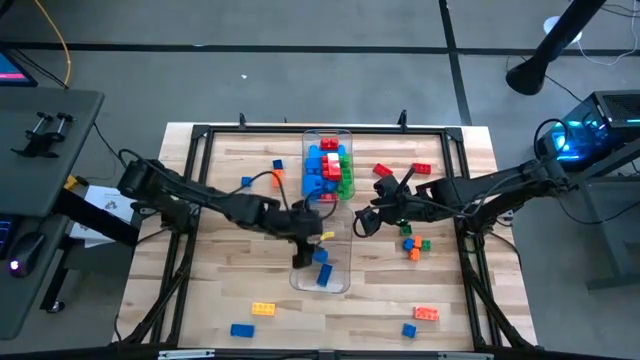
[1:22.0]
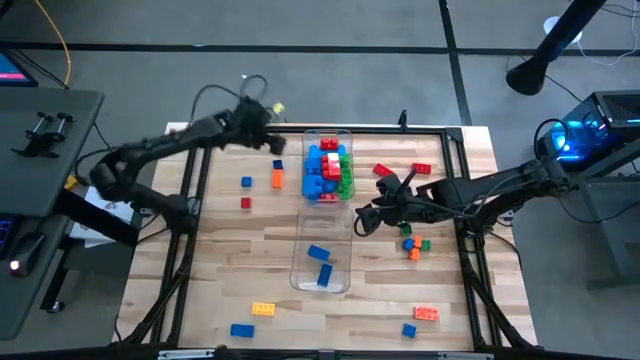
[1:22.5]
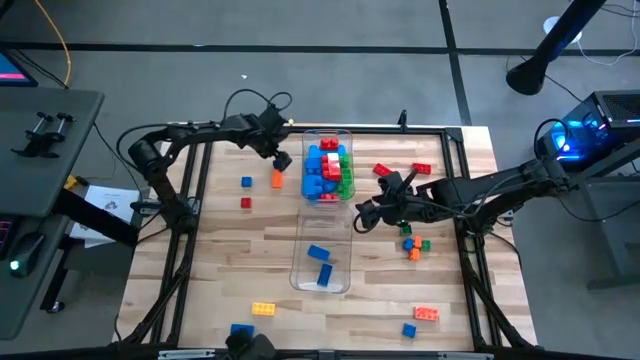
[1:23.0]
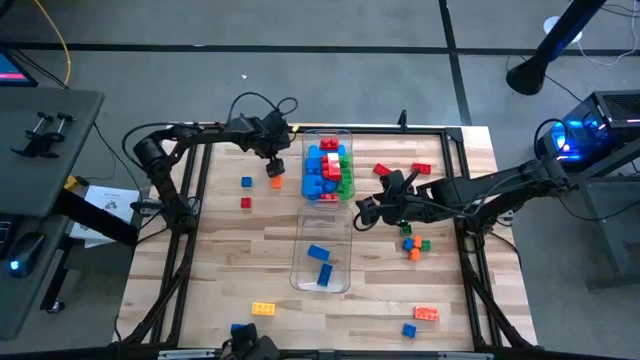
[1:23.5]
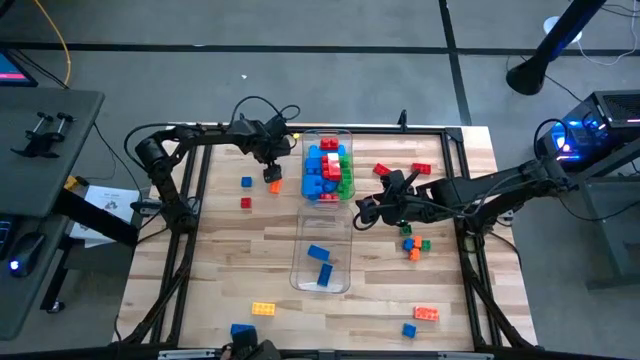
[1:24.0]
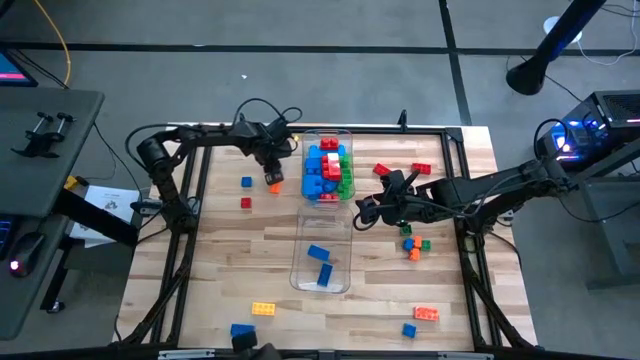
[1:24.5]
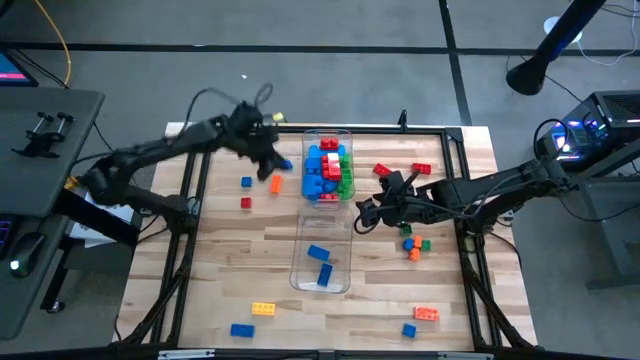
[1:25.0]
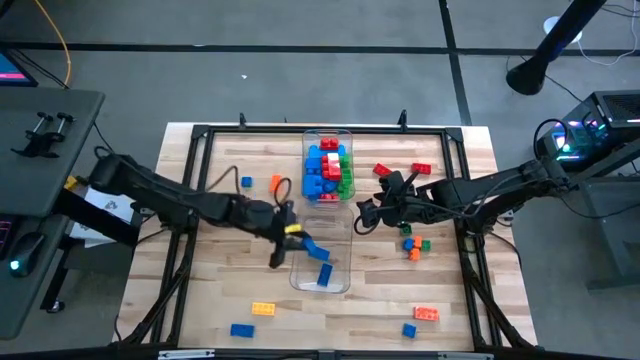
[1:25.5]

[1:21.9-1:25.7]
Task: Sort blocks by size
Put the small blue game piece in the bottom transparent bin

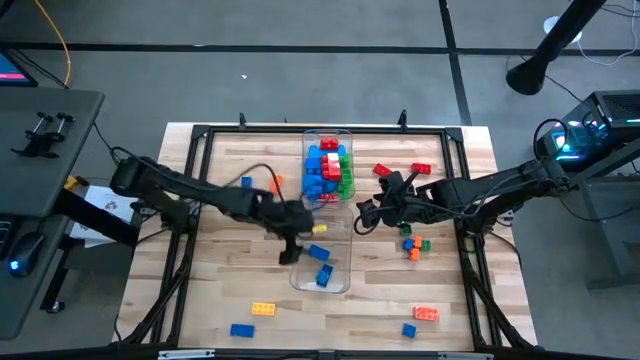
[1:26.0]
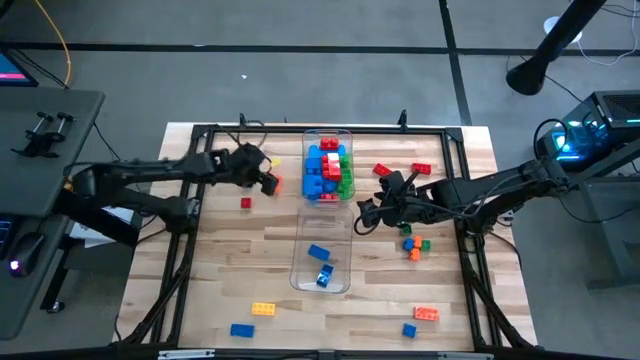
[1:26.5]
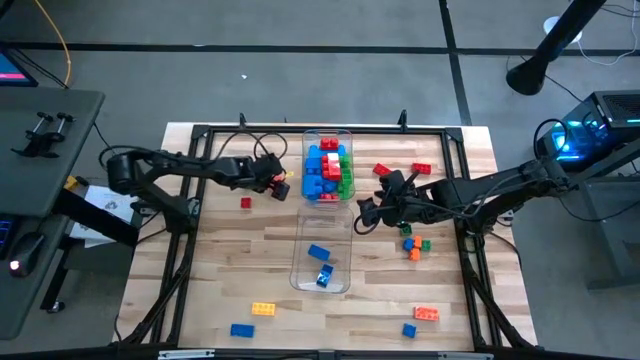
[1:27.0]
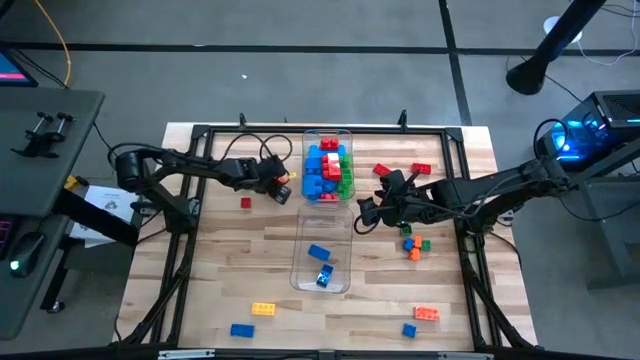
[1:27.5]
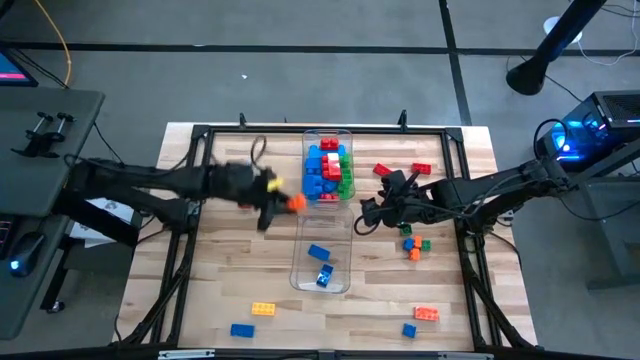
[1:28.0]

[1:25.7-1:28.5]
Put the small orange game piece in the bottom transparent bin

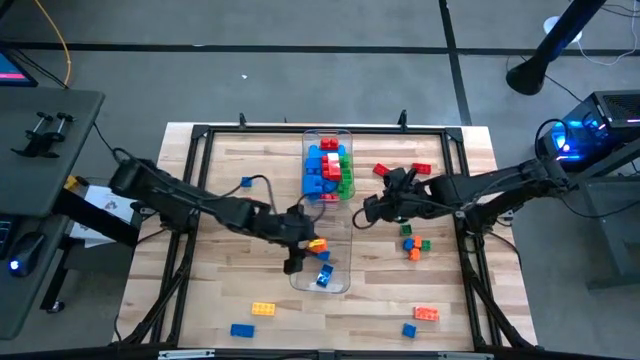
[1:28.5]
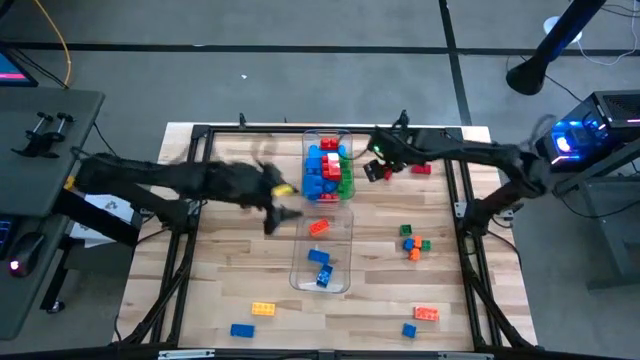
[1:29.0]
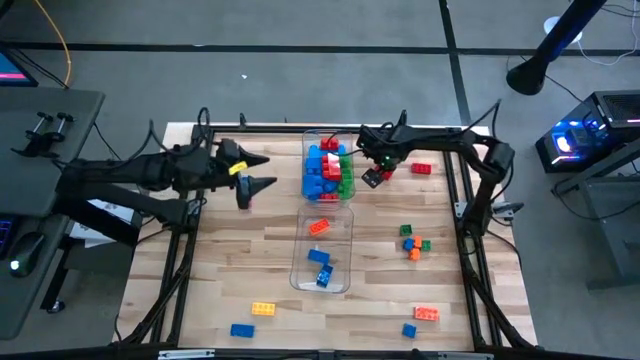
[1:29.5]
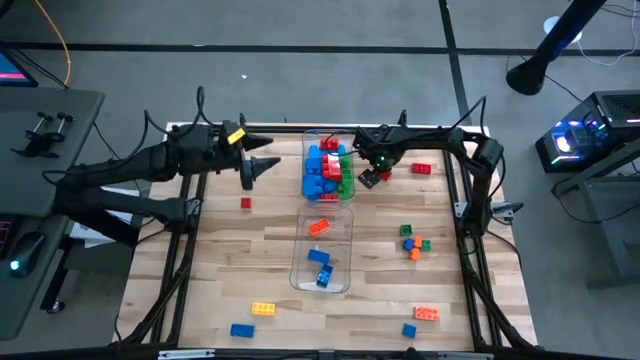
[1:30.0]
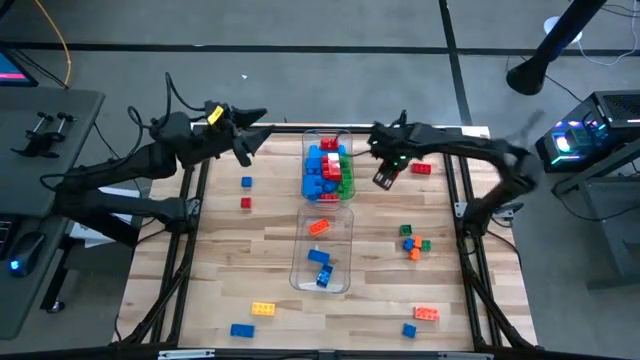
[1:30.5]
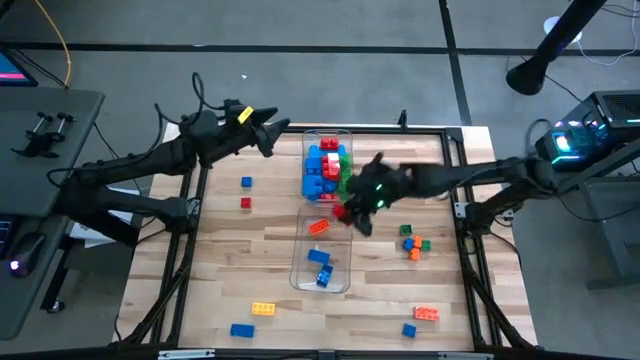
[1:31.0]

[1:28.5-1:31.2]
Put the small red game piece in the bottom transparent bin

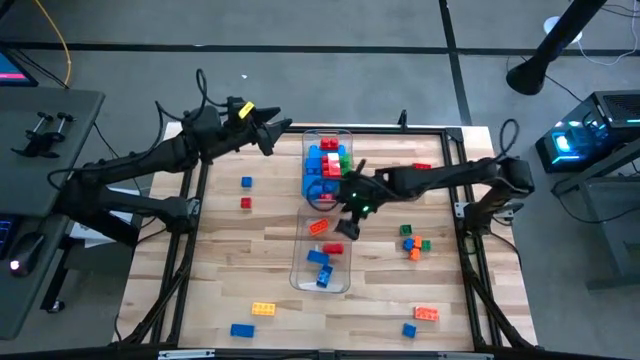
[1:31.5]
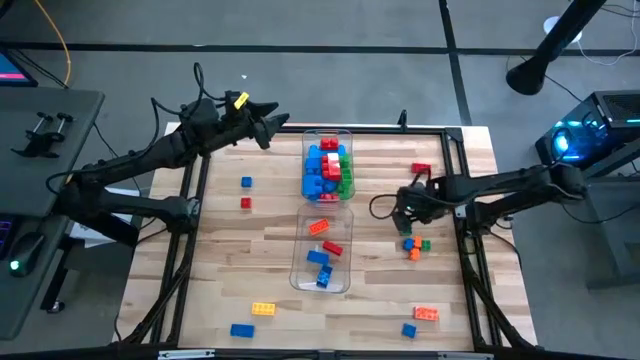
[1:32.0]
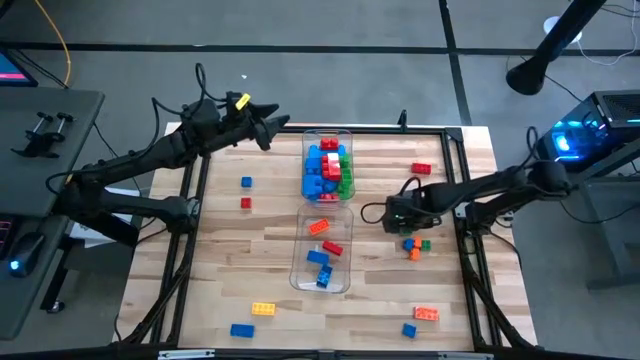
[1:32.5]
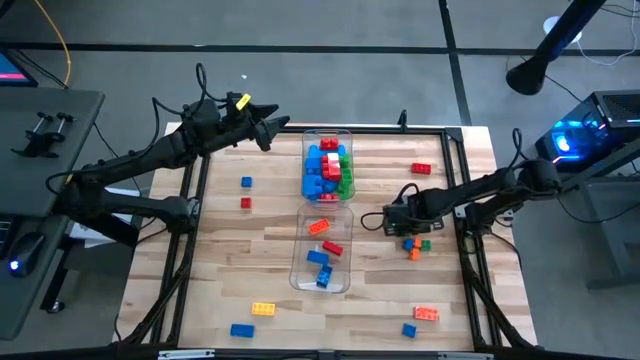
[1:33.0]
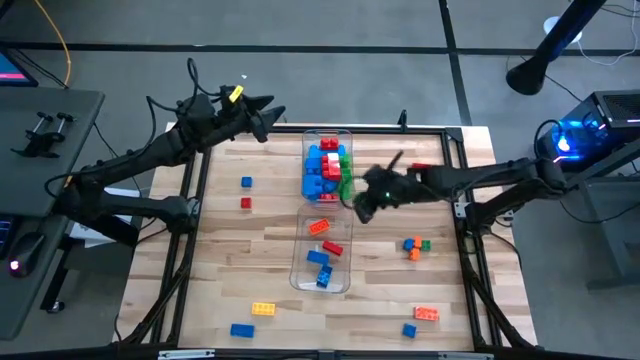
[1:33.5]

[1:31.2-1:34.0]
Put the small green game piece in the bottom transparent bin

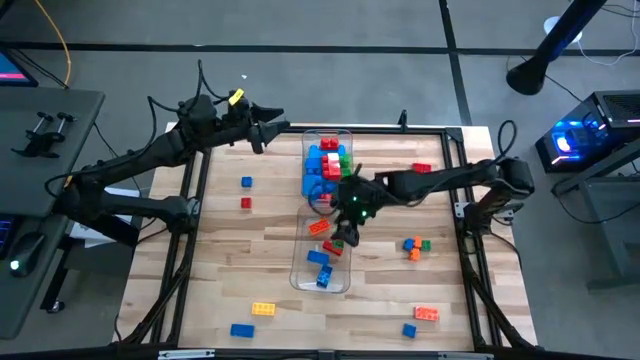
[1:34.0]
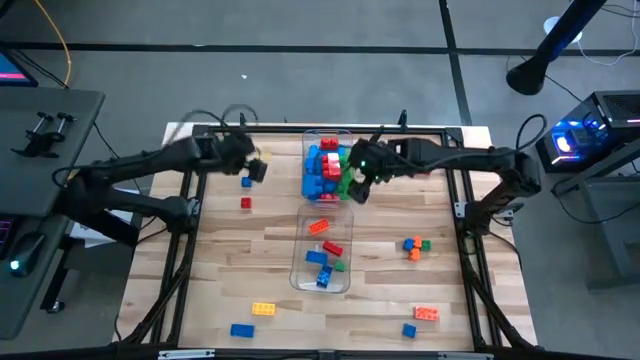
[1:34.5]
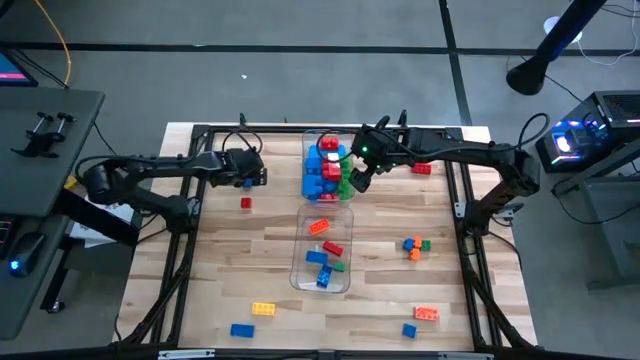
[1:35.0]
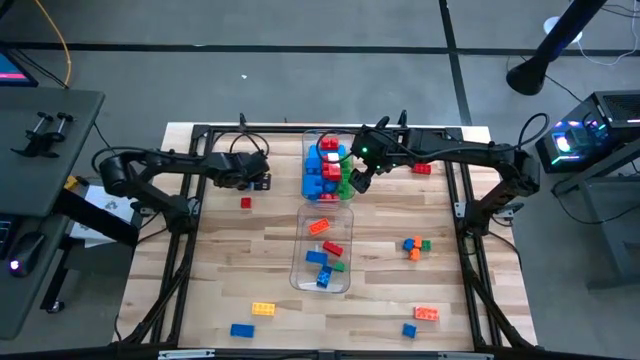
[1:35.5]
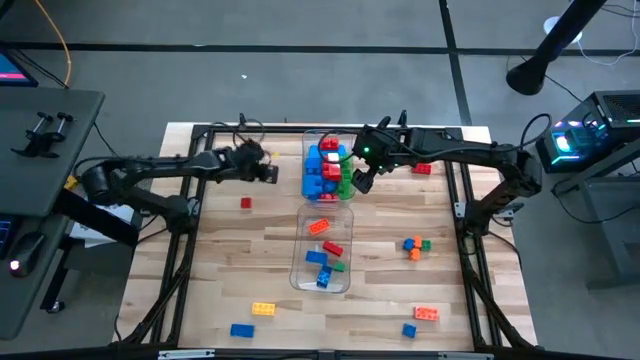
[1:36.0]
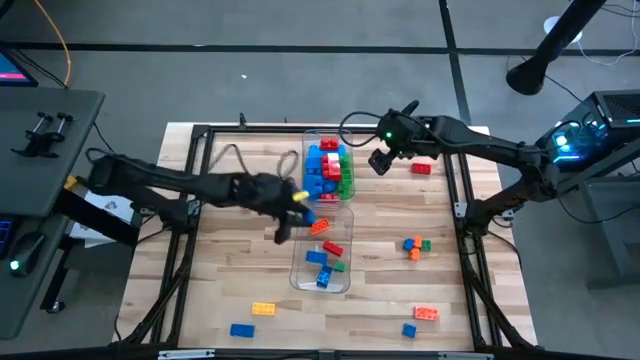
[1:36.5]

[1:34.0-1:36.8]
Put the small blue game piece in the bottom transparent bin

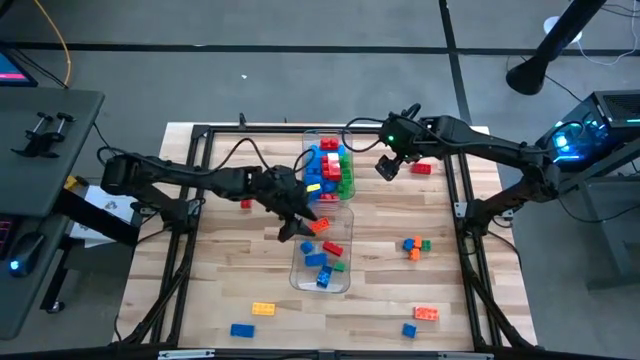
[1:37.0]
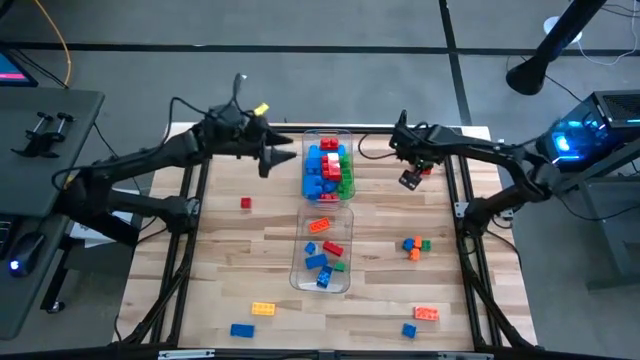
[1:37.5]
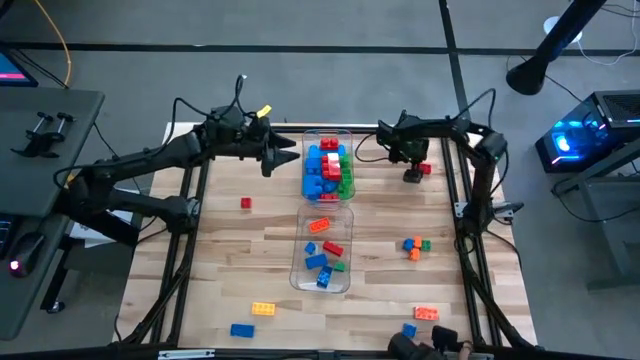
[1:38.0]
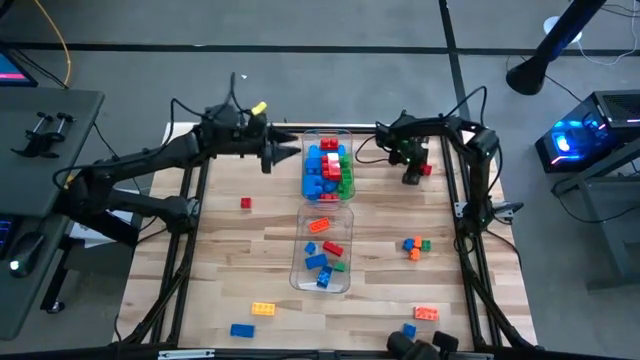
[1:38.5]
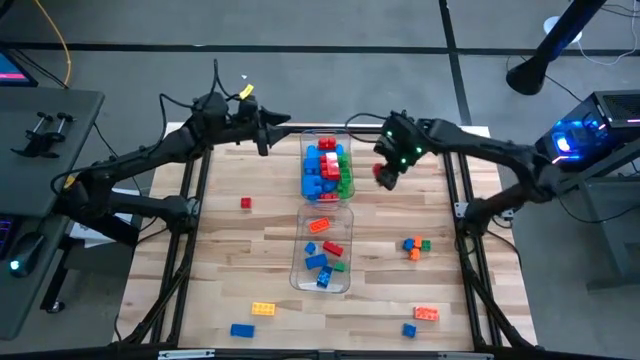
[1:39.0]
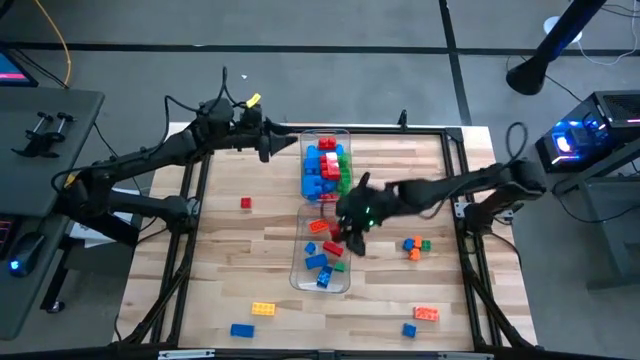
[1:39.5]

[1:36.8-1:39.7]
Put the small red game piece in the bottom transparent bin

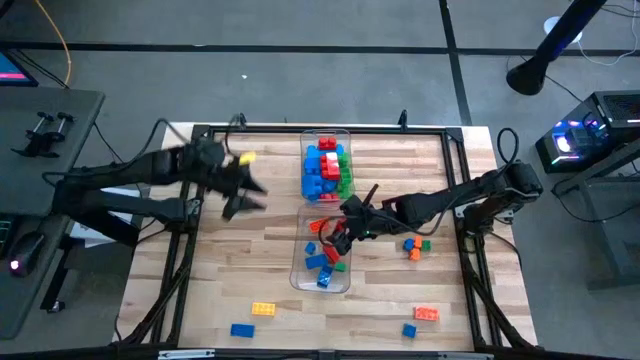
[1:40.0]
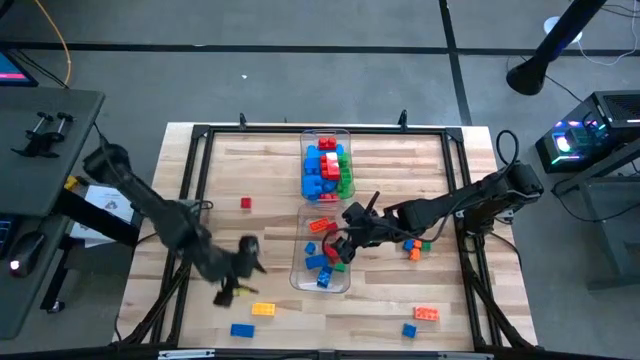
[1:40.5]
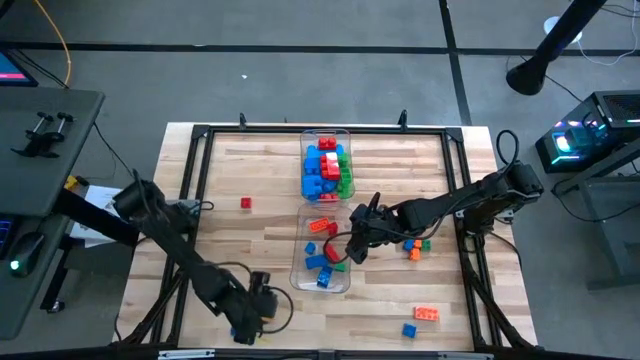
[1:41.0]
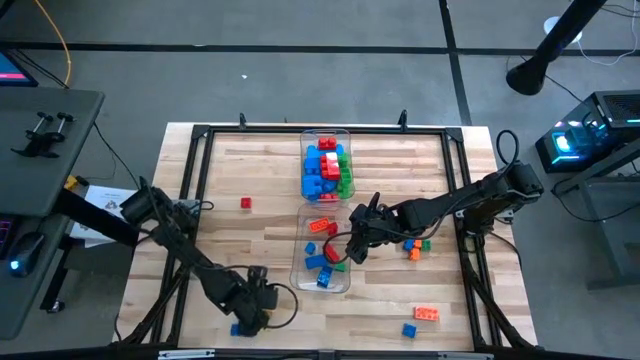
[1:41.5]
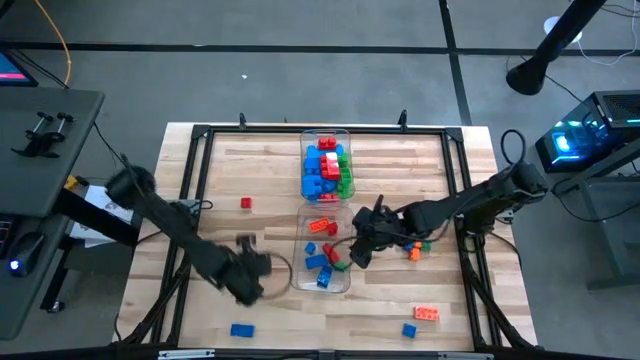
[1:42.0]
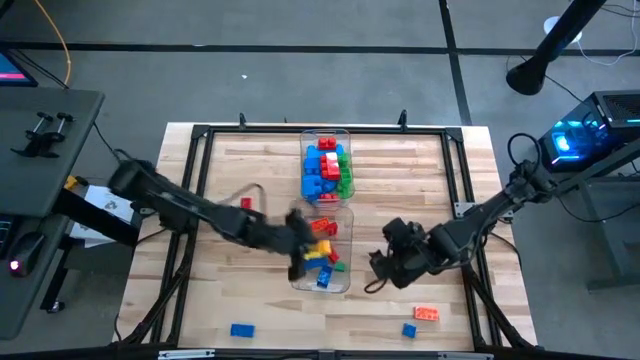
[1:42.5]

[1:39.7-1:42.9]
Put the small yellow game piece in the bottom transparent bin
